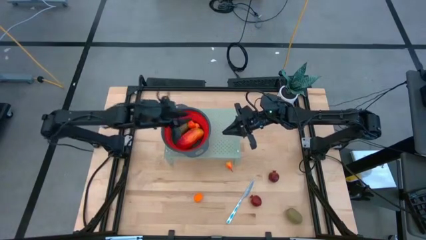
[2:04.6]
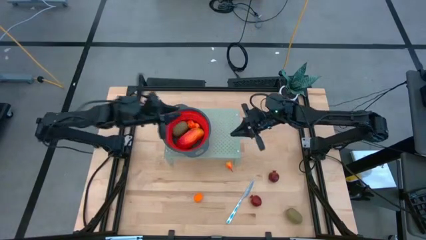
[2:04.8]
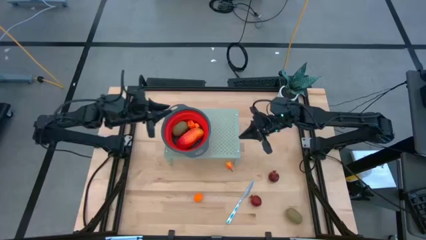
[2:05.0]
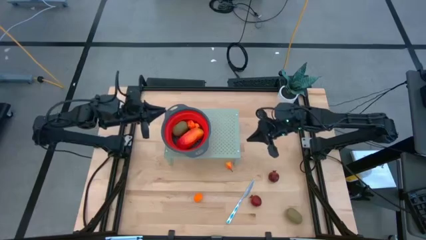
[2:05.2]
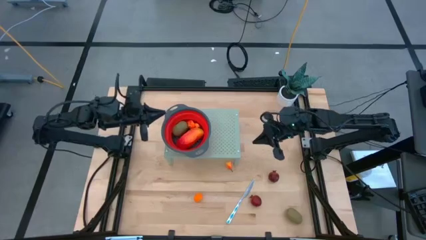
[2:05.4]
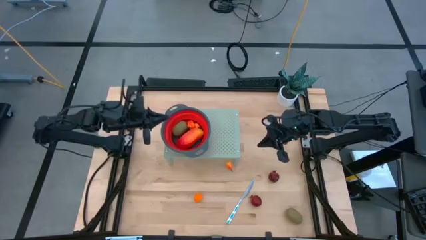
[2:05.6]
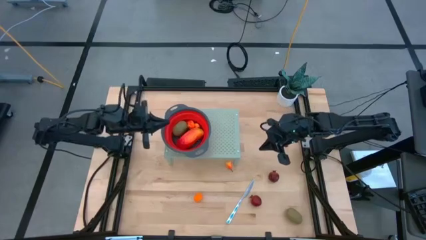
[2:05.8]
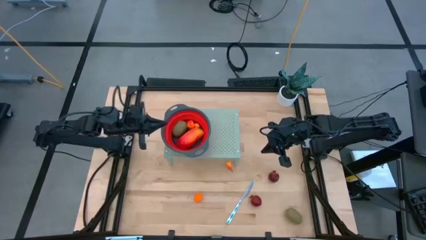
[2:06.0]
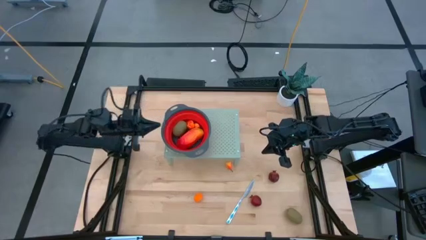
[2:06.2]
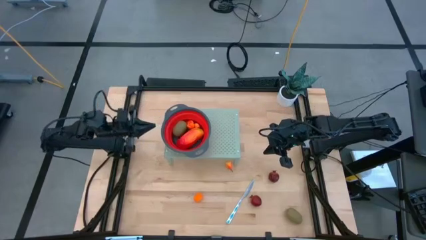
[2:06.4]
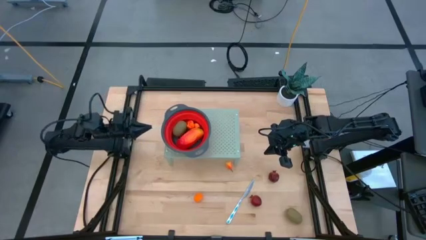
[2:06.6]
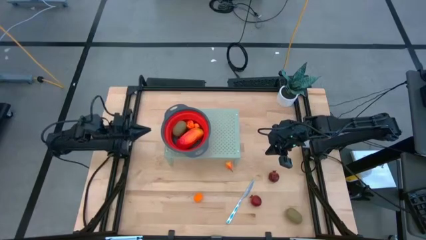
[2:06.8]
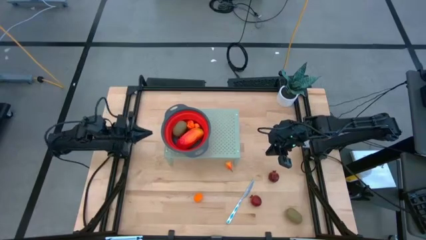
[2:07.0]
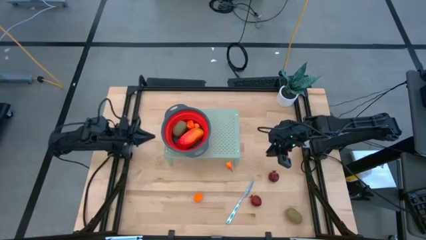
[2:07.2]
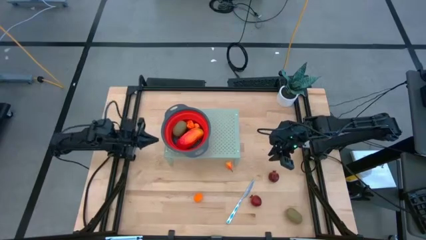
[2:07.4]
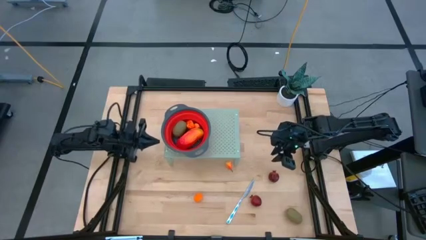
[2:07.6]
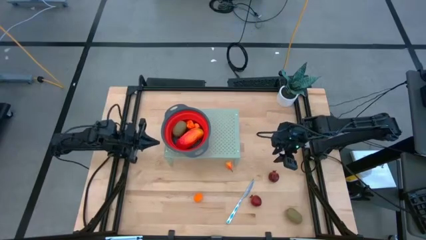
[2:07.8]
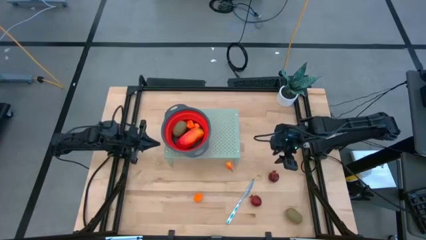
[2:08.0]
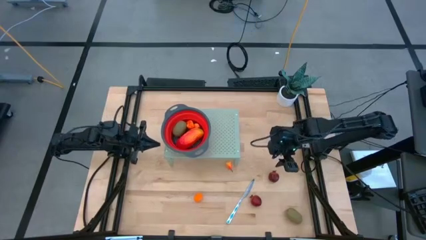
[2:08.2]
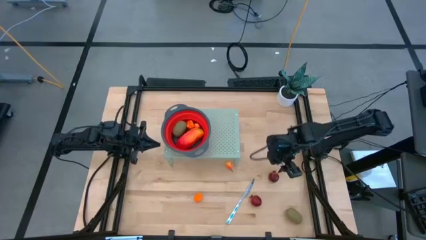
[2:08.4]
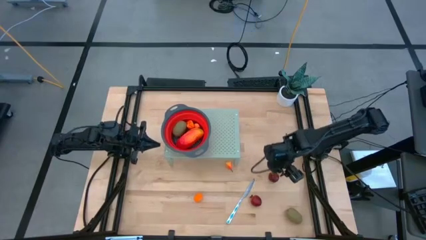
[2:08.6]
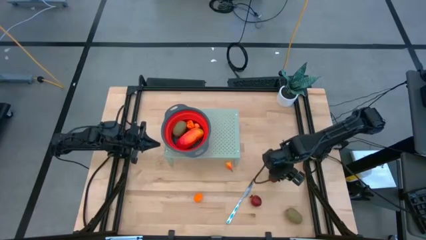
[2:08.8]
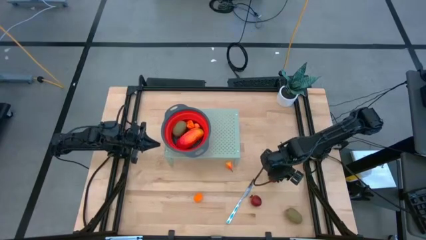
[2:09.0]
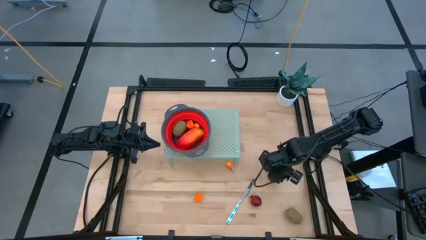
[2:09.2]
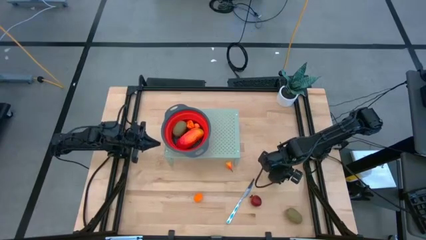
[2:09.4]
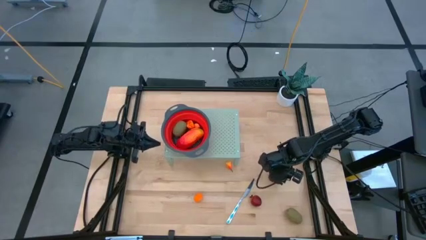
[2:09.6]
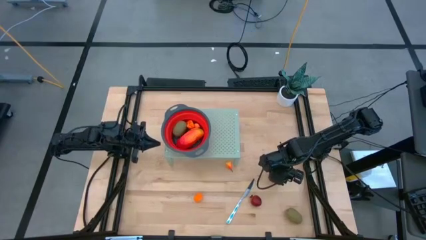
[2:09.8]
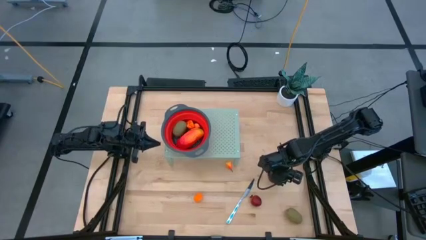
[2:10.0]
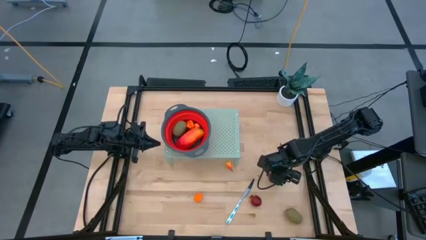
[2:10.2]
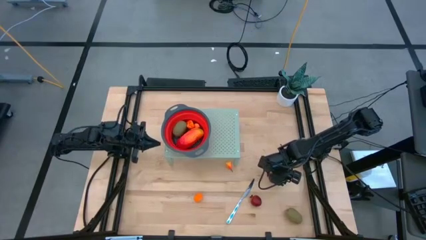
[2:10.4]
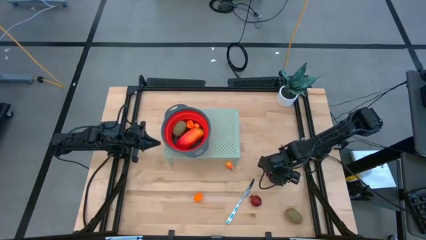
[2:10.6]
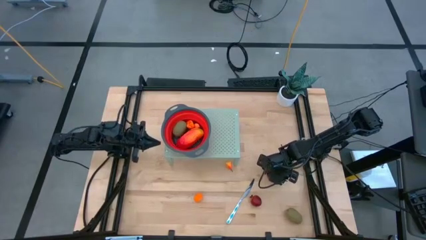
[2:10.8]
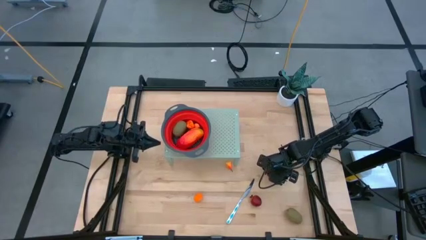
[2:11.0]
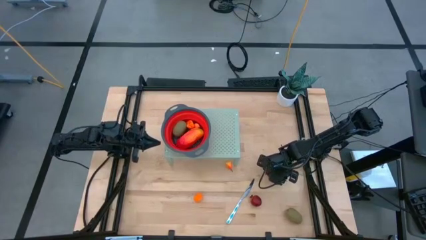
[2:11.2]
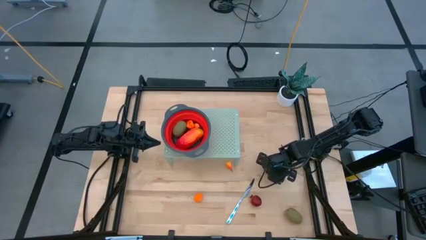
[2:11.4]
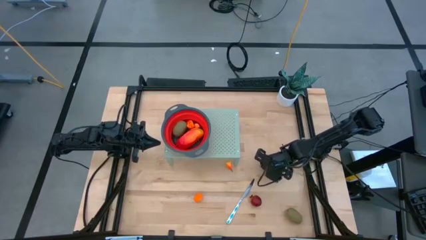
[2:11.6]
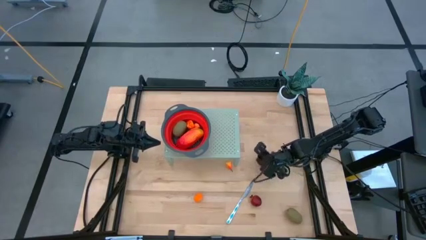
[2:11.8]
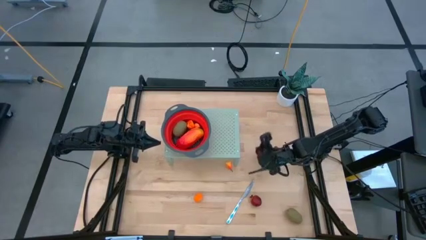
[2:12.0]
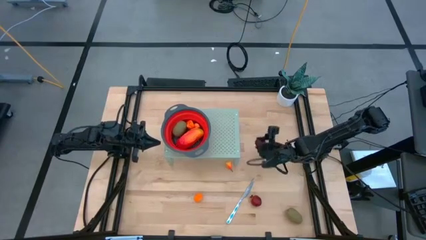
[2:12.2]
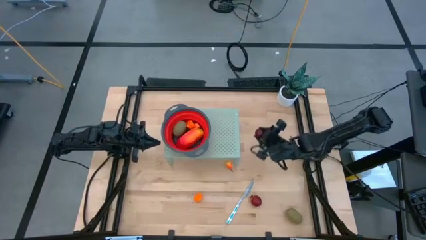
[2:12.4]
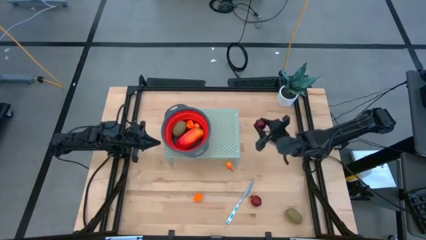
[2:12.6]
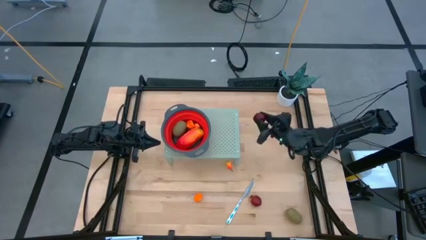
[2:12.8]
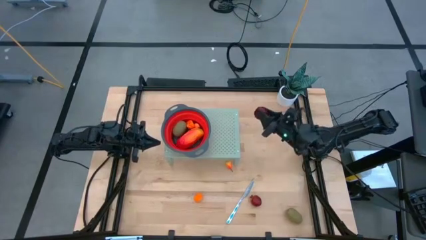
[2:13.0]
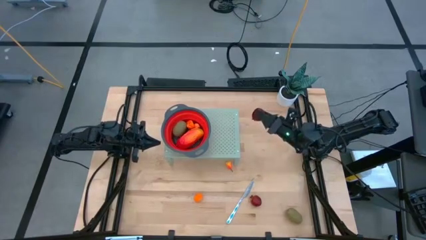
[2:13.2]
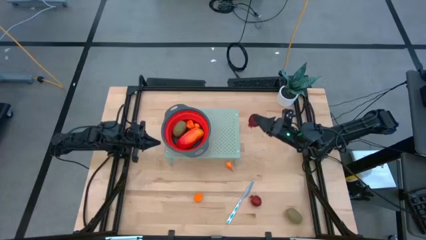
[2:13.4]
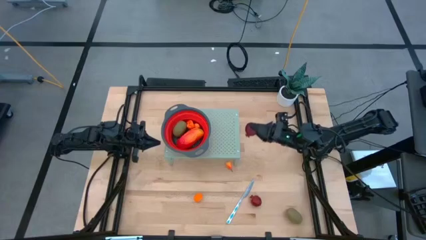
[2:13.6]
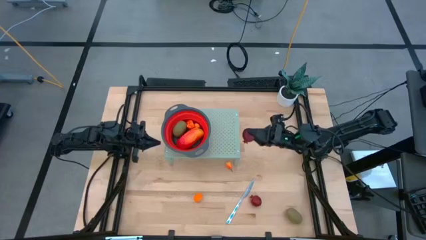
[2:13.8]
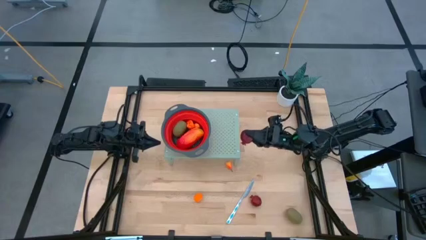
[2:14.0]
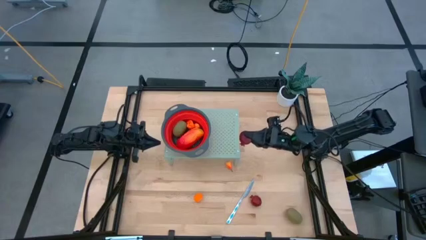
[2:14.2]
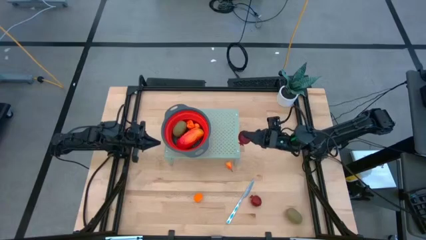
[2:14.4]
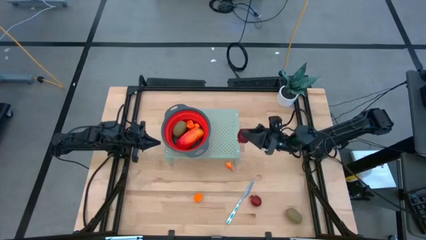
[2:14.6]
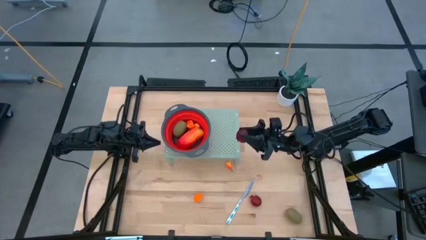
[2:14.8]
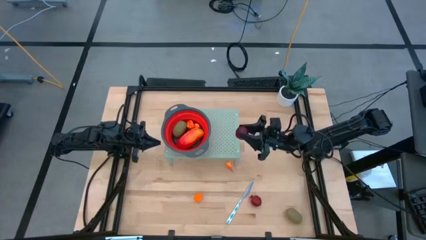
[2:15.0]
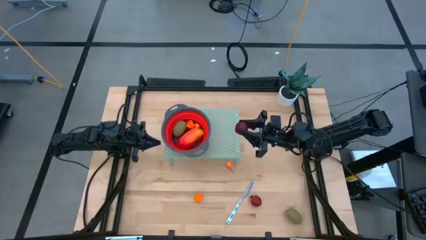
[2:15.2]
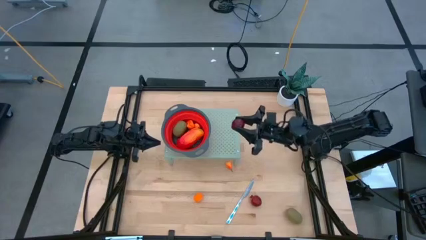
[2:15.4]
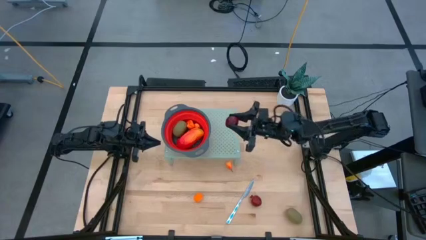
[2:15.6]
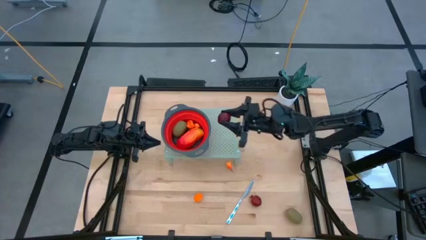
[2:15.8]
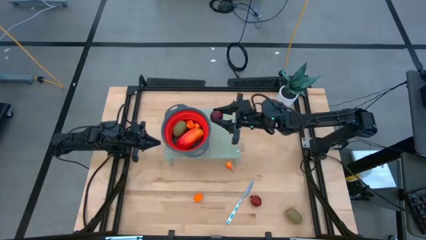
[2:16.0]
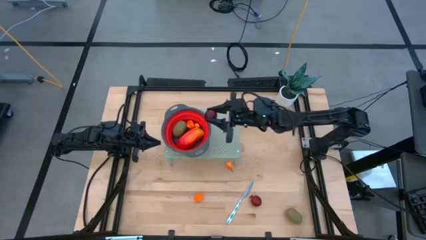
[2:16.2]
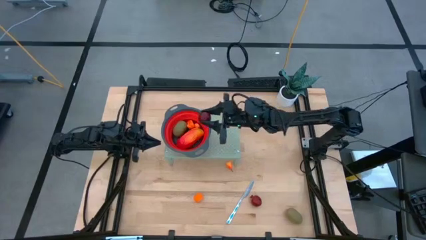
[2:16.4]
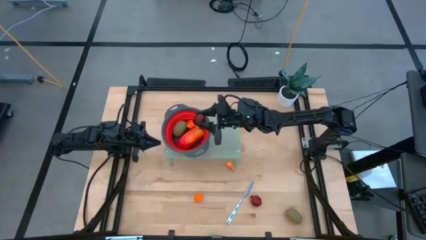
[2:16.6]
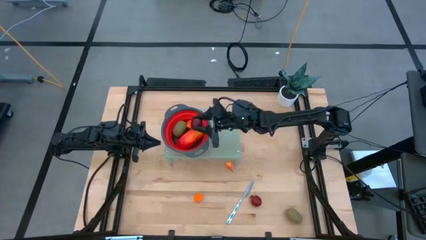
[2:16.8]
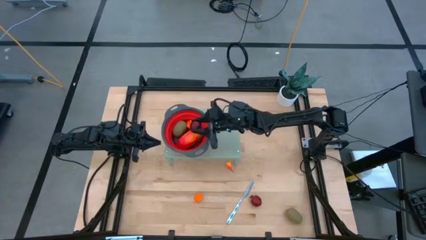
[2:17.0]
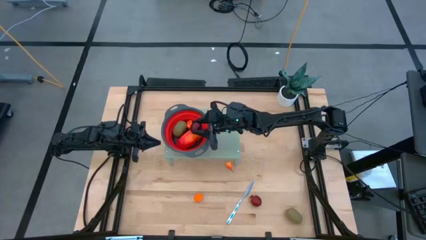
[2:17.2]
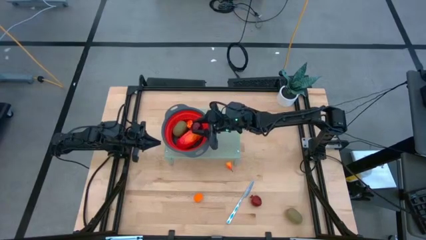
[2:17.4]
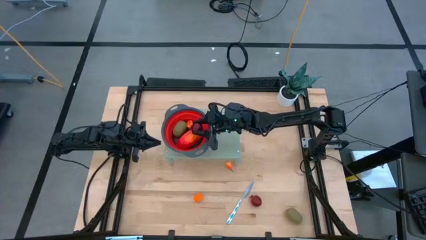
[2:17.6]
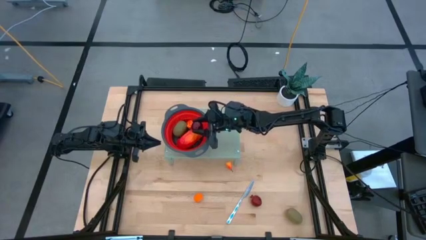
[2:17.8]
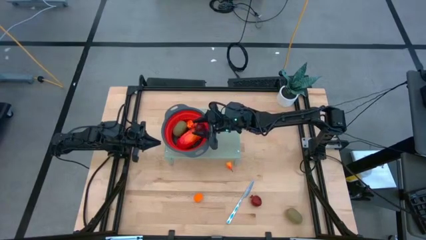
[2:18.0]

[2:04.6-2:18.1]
Task: Pick & Place Fruit
Put the pomegranate into the red strainer bowl on the shelf

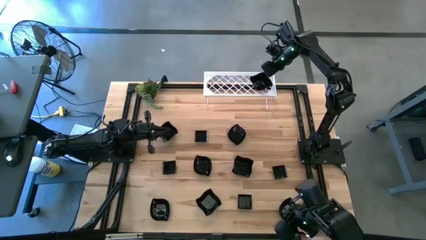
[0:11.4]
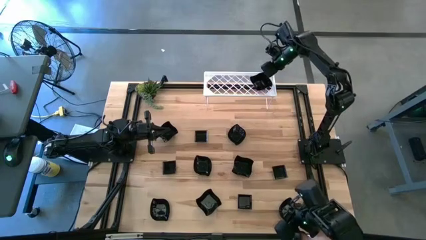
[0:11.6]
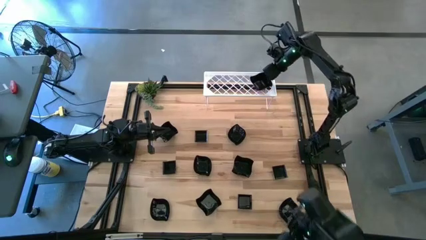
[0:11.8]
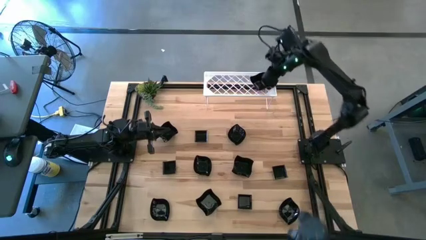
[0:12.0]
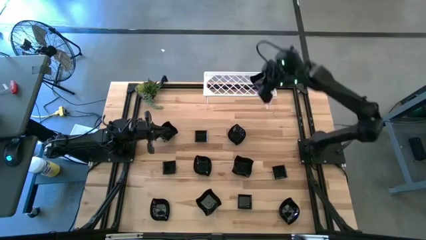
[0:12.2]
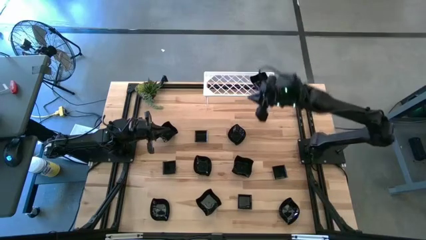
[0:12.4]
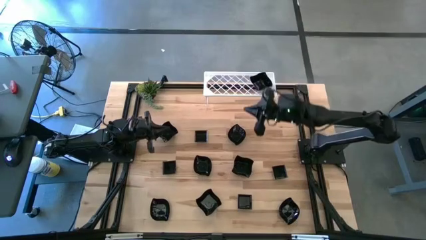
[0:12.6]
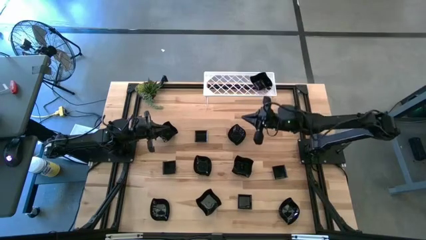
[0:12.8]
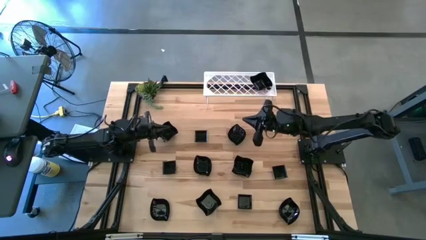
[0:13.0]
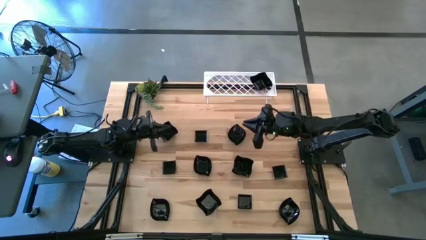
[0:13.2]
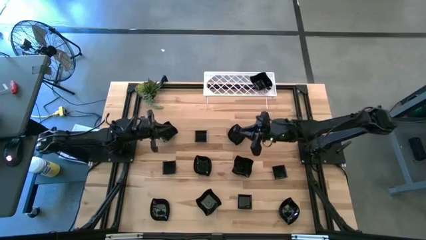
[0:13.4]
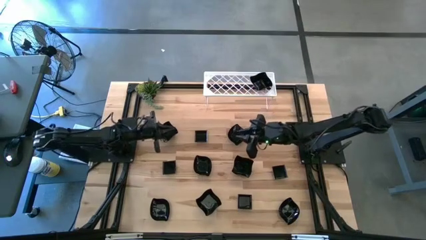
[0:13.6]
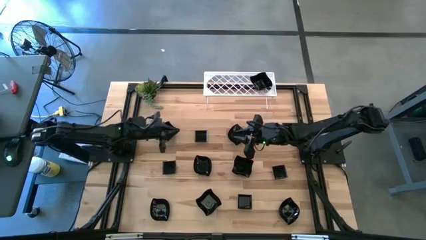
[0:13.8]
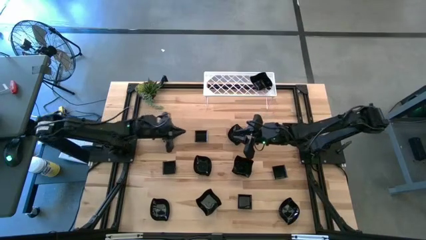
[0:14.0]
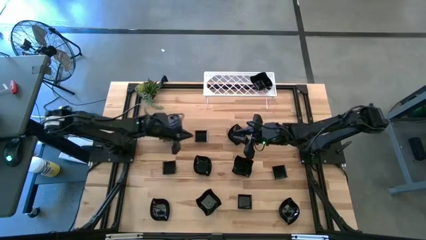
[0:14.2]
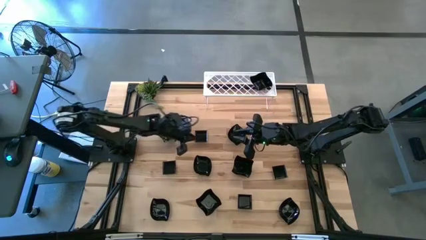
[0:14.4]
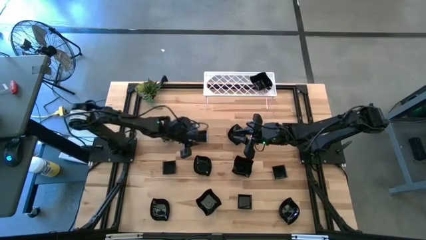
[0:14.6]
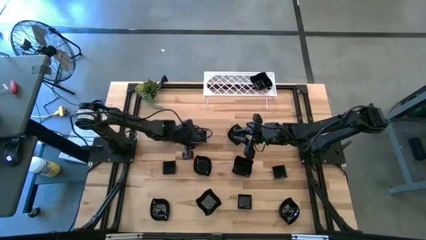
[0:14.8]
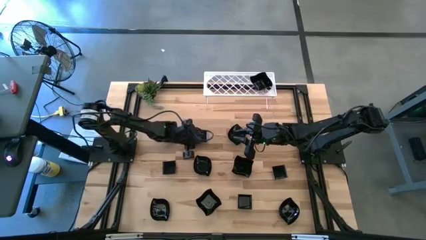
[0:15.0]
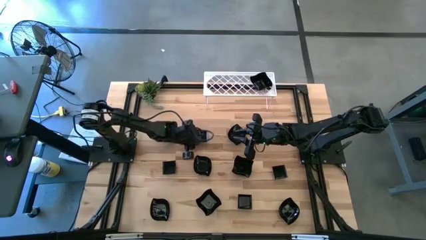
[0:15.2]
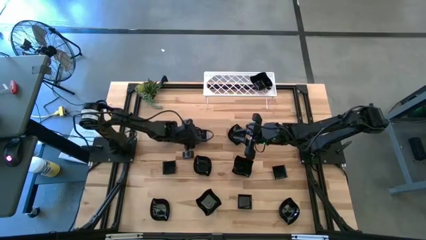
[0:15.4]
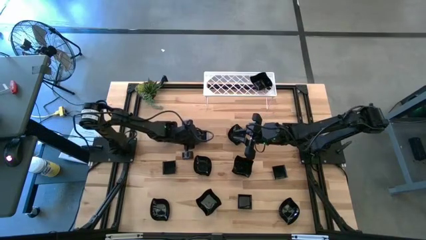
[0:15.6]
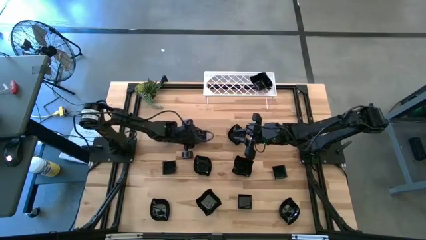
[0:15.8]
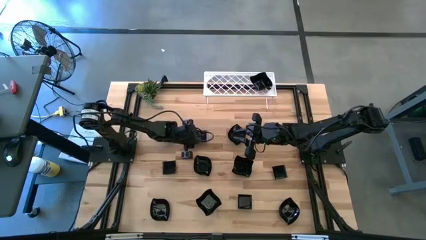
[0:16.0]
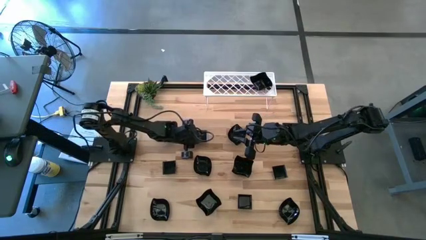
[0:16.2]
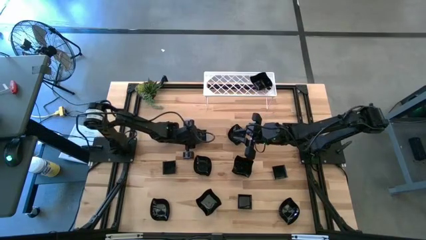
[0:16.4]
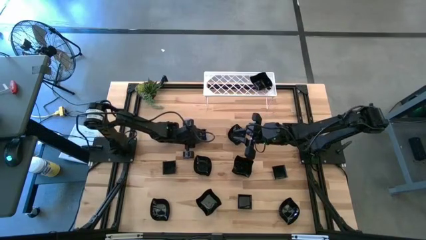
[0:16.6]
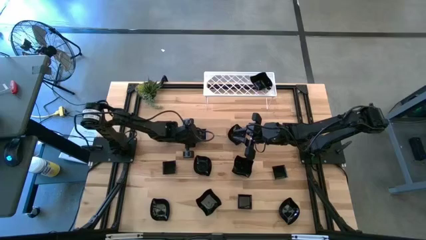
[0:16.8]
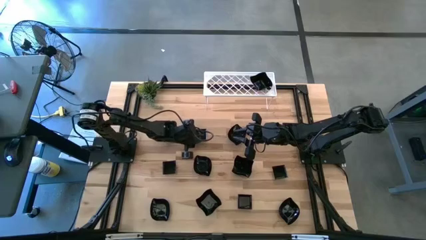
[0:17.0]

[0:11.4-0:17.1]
Task: Pick & Place Mini shaped plates
Put the square plate on the shelf
